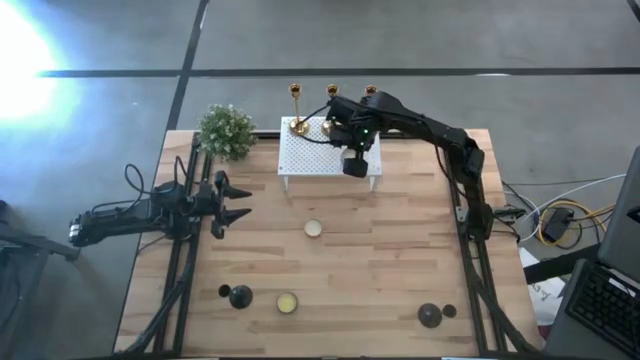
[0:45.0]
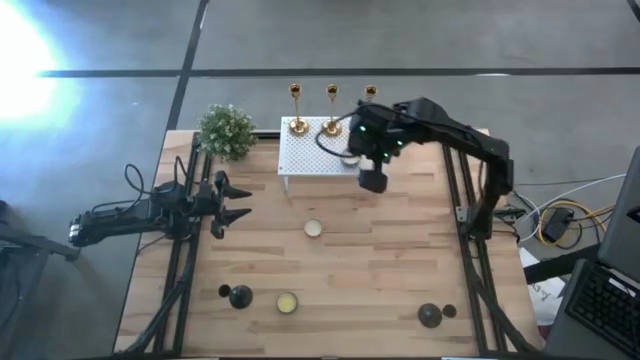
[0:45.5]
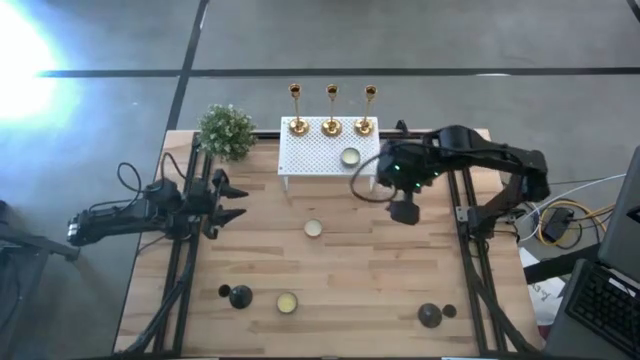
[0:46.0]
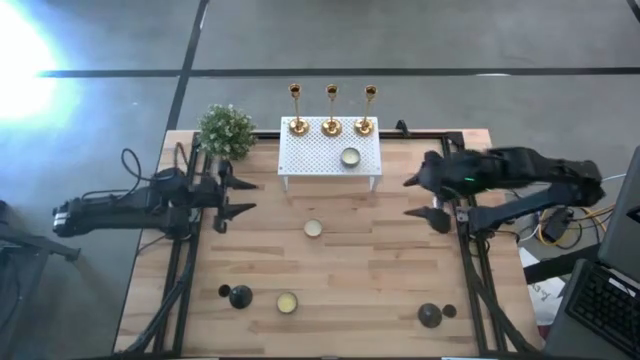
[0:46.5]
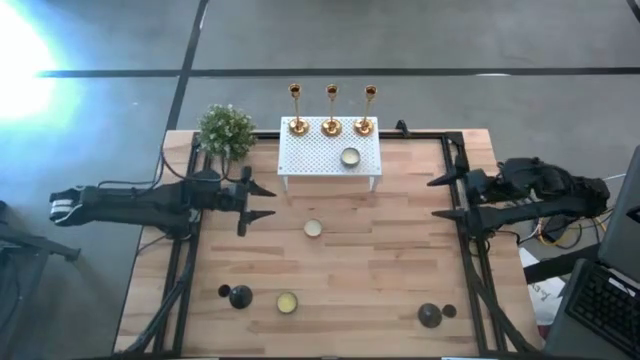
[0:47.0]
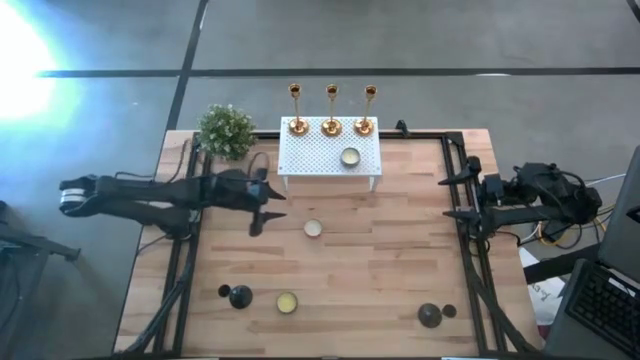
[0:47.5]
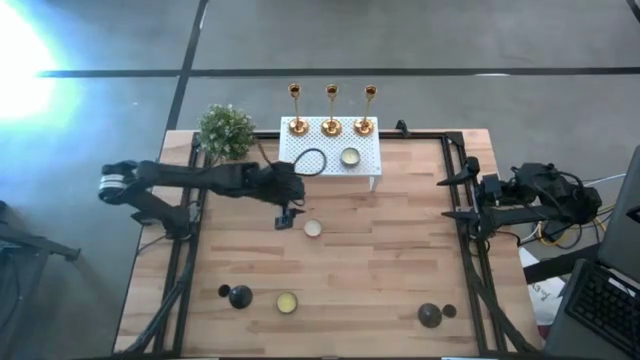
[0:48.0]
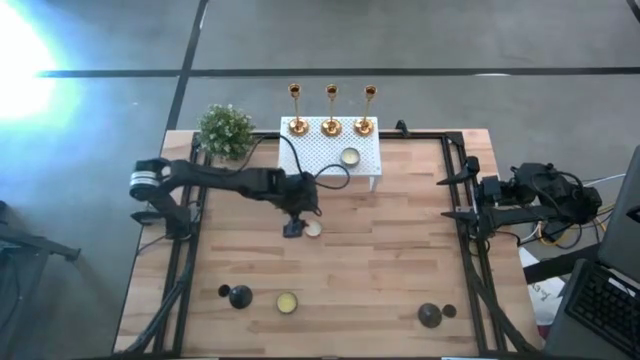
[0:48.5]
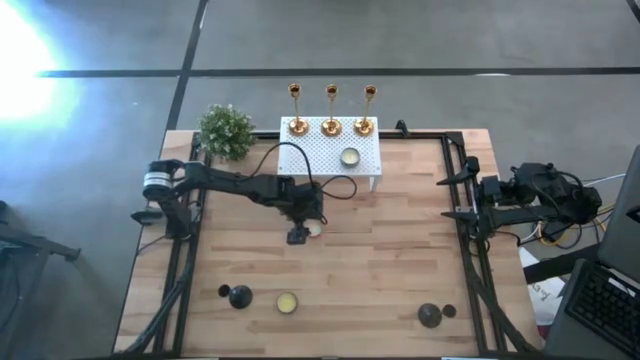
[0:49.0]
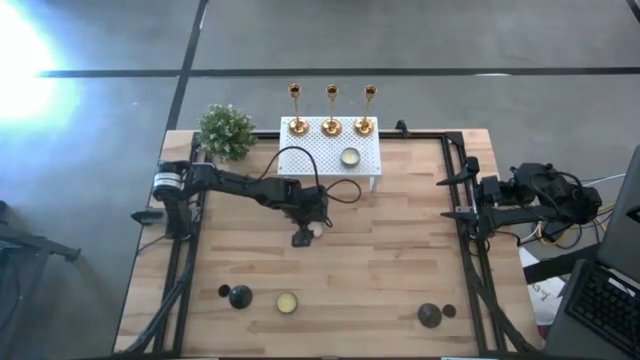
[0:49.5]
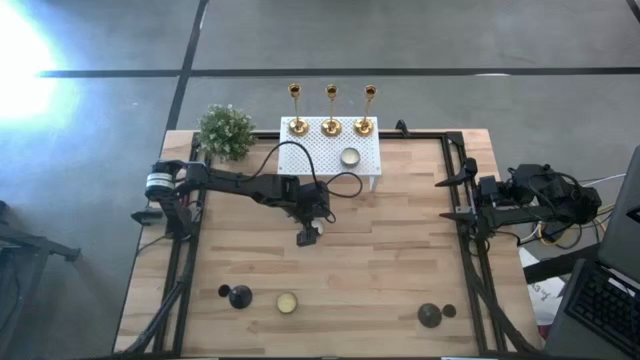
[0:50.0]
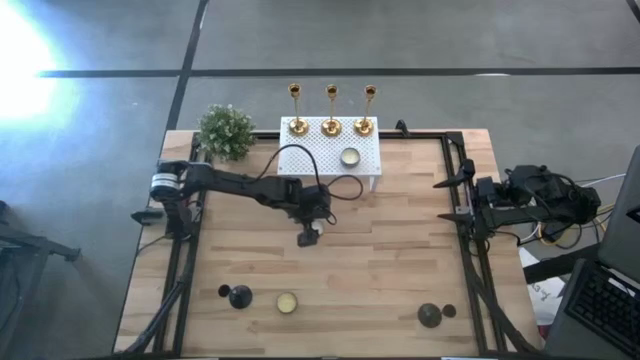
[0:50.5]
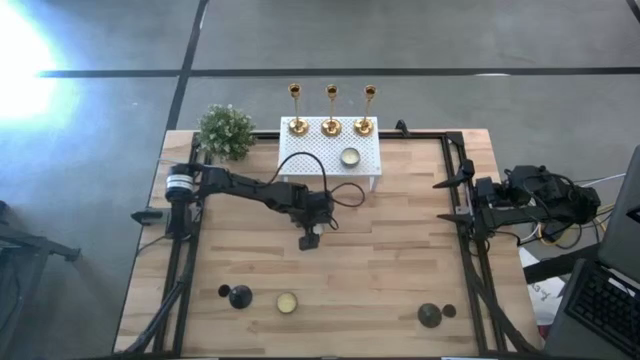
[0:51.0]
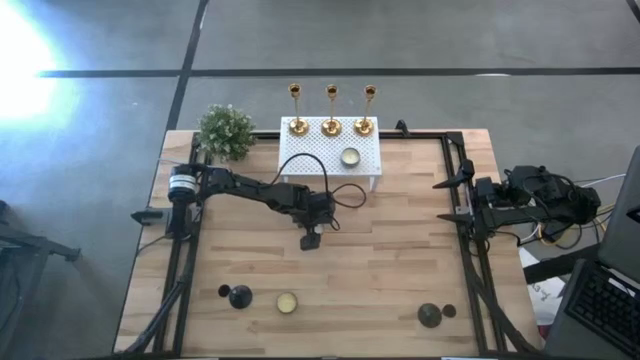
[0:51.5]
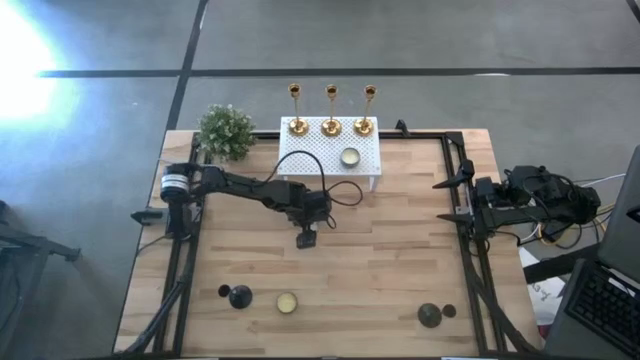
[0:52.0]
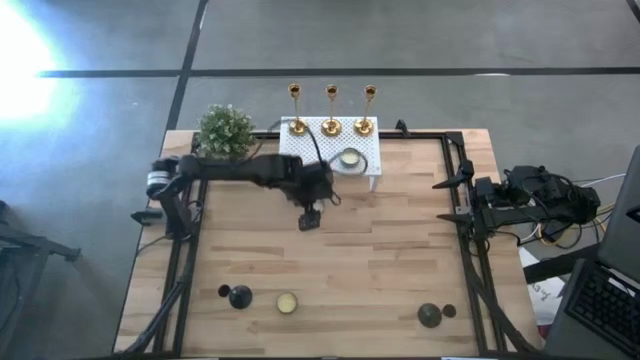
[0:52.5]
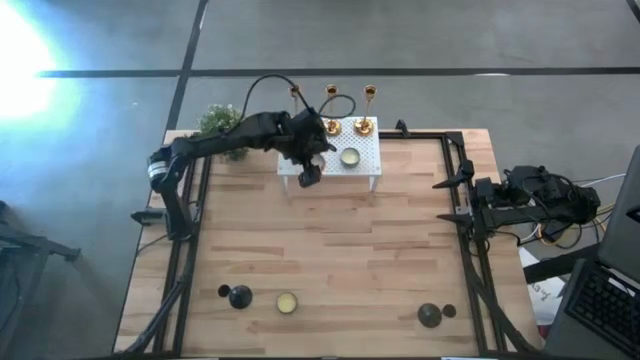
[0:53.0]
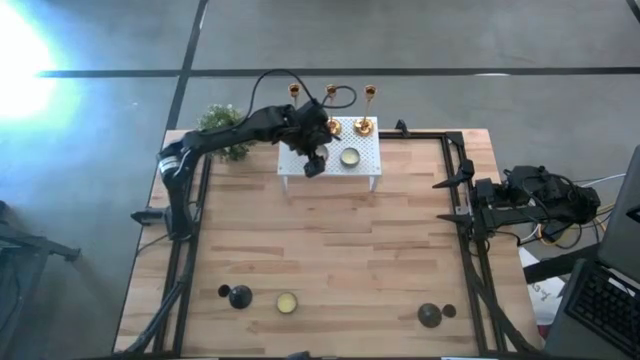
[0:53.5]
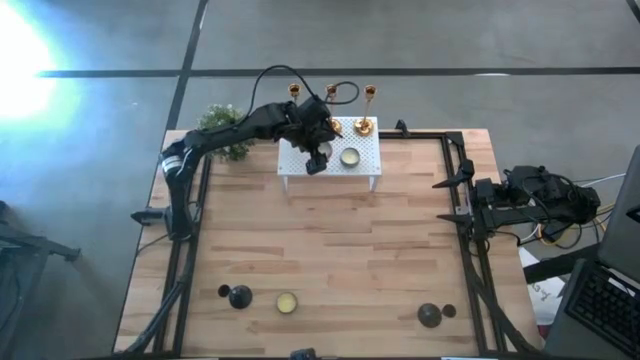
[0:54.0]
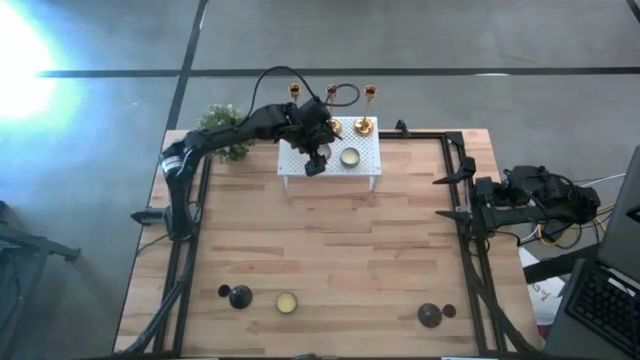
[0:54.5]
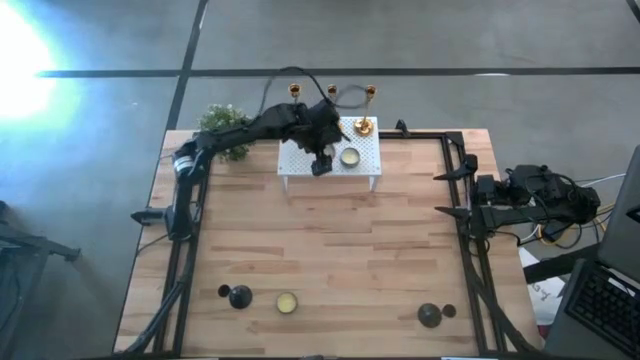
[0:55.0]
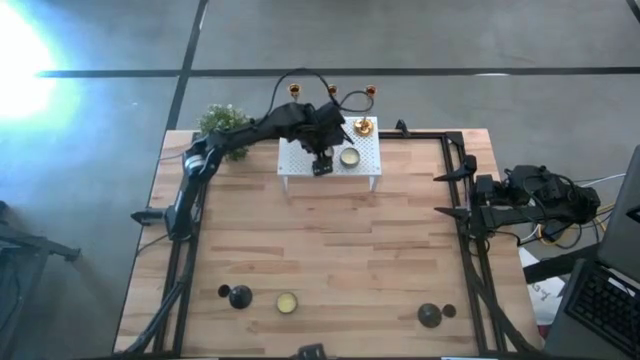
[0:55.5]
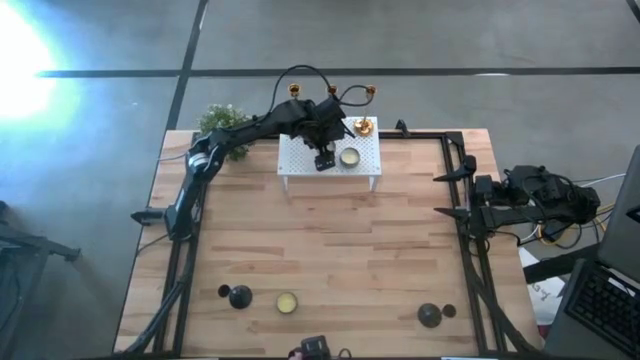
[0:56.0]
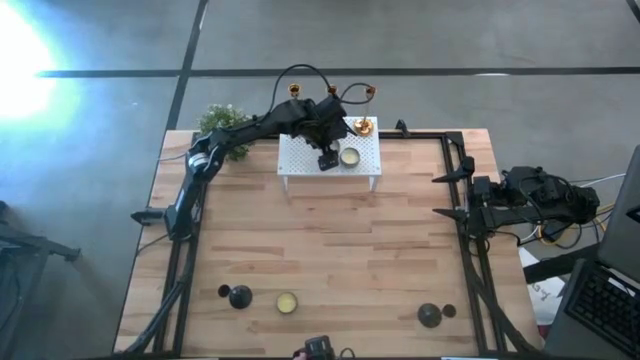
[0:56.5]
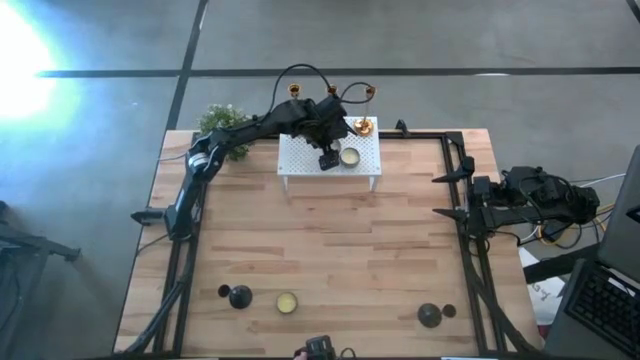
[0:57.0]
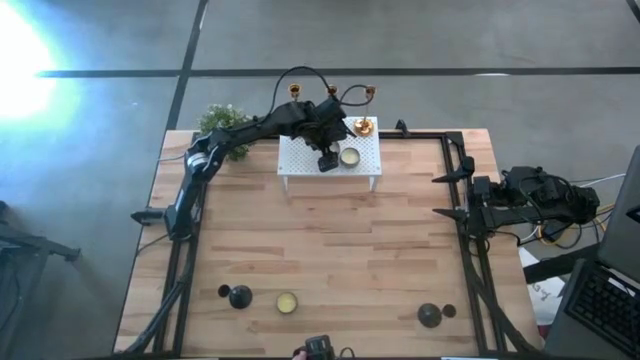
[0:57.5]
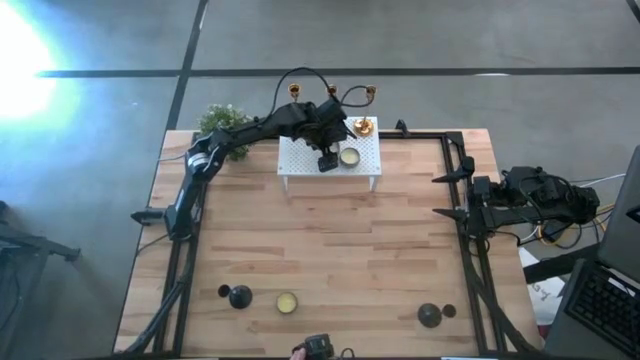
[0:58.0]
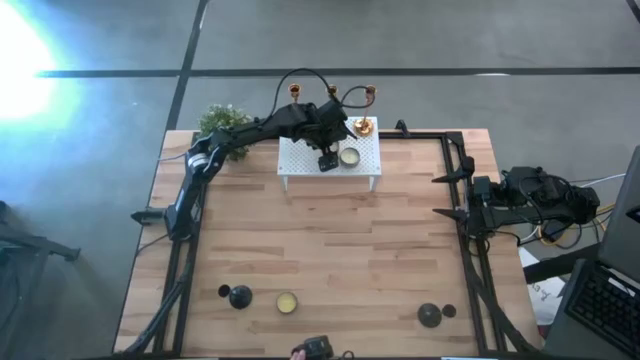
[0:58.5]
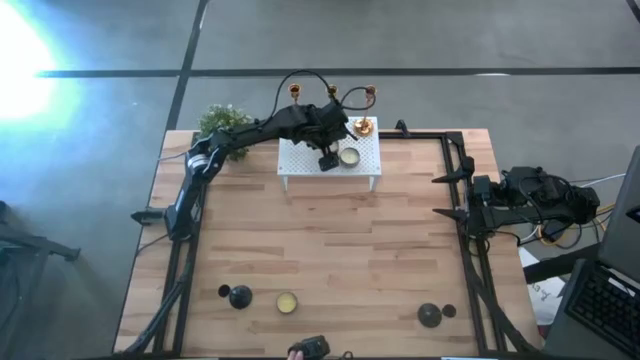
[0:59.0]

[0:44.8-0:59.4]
Task: Pick & Place candle stick holders
Put the orange scented candle on the shelf aligned with the other scented candle

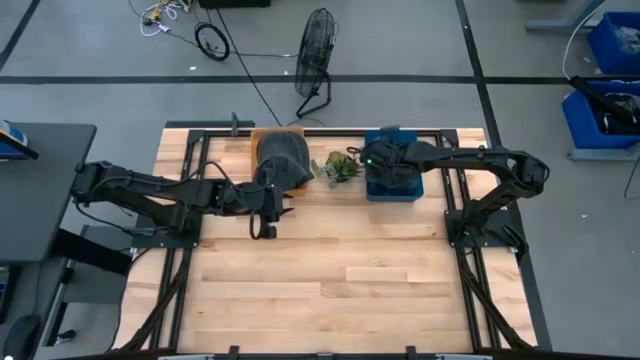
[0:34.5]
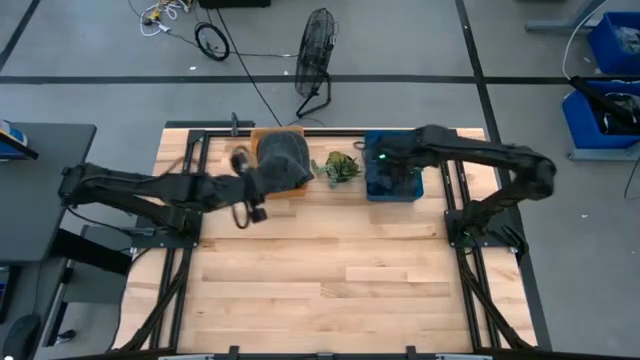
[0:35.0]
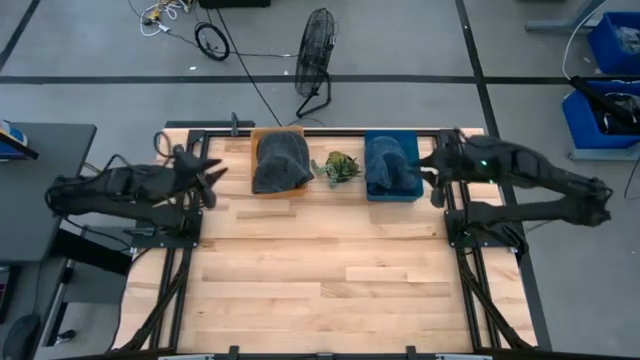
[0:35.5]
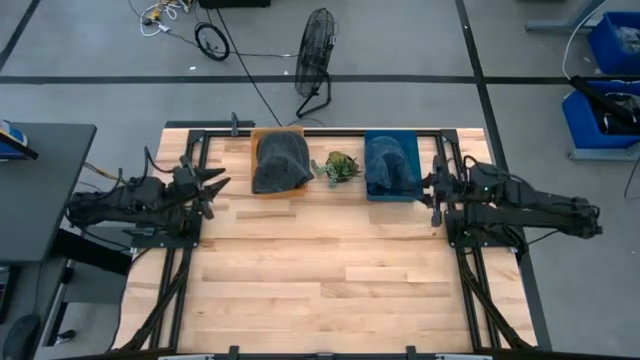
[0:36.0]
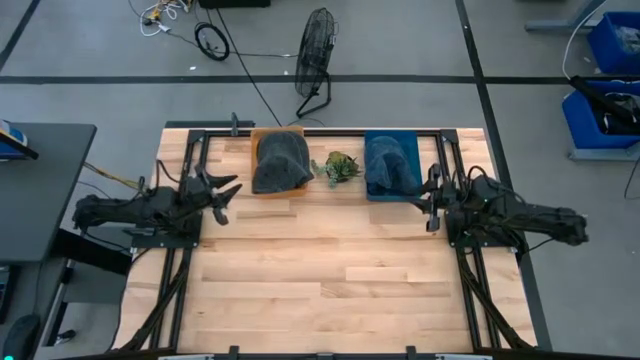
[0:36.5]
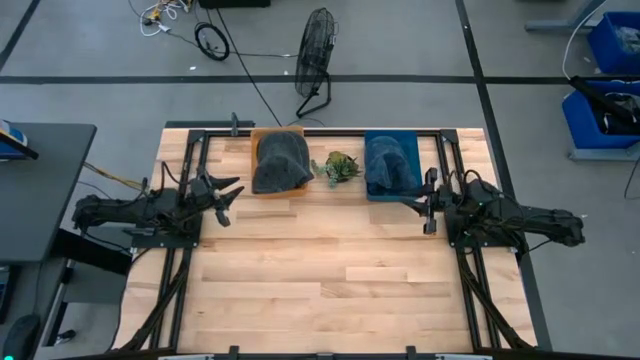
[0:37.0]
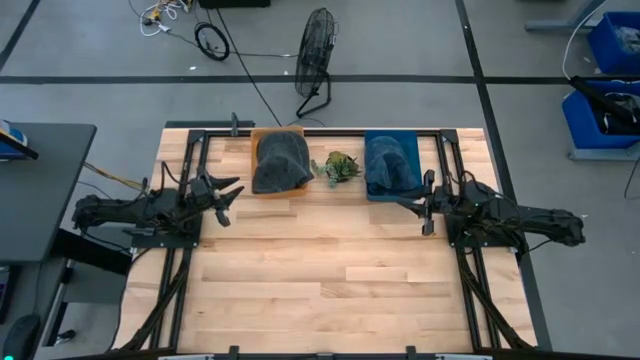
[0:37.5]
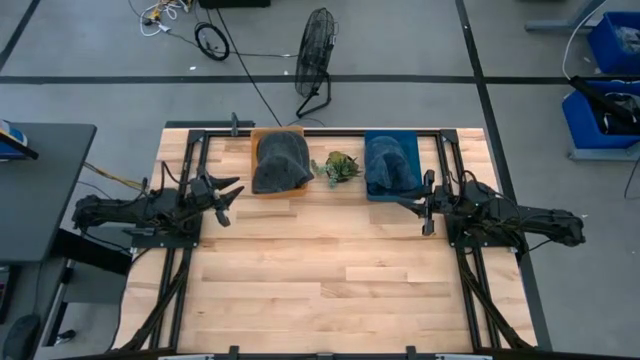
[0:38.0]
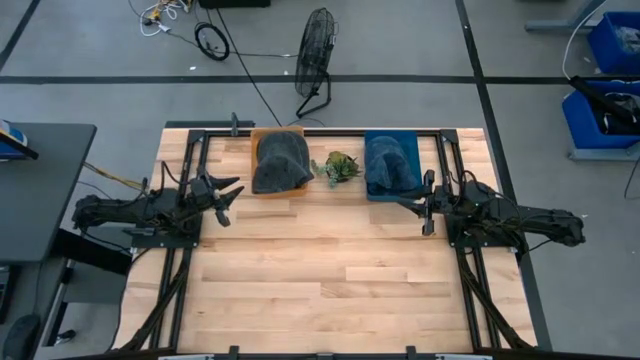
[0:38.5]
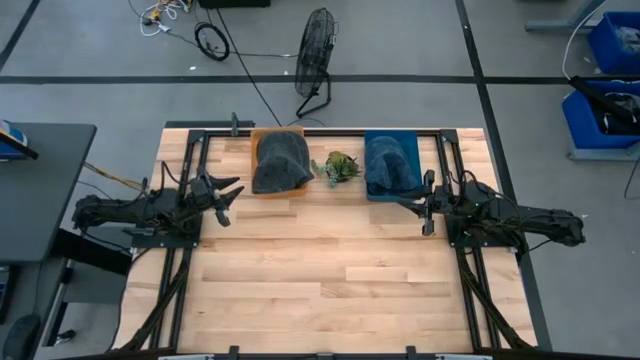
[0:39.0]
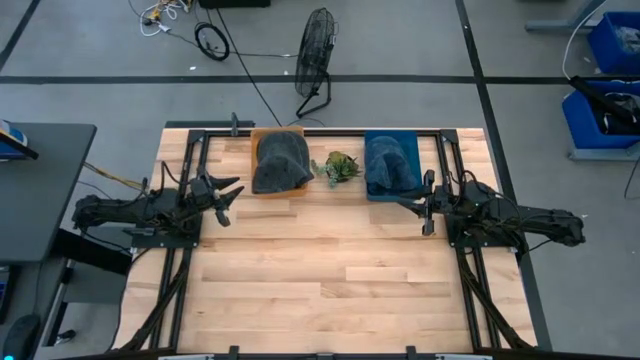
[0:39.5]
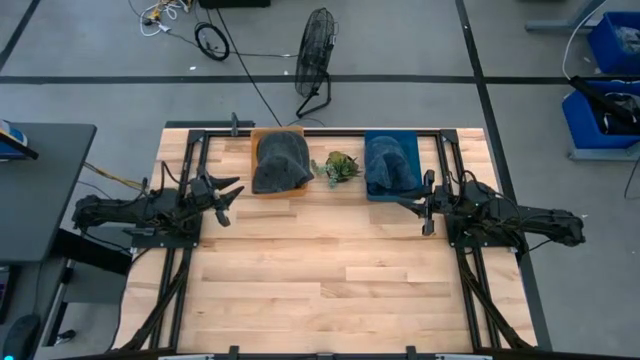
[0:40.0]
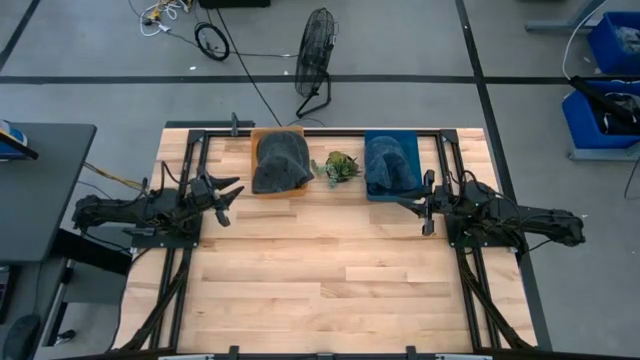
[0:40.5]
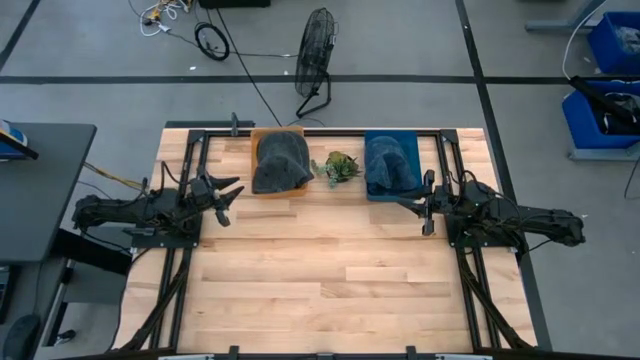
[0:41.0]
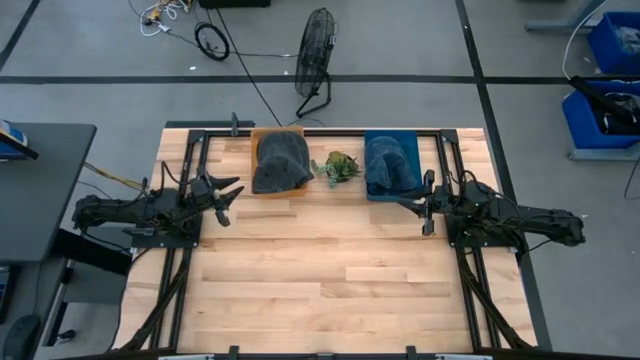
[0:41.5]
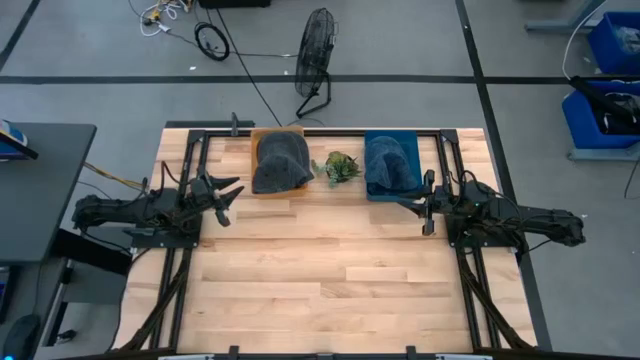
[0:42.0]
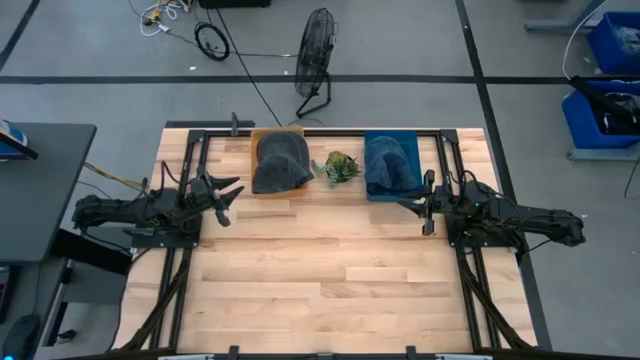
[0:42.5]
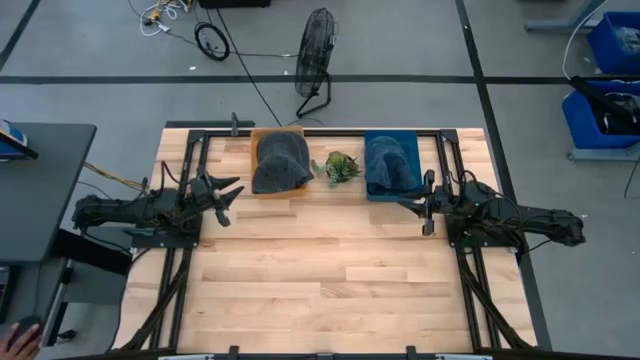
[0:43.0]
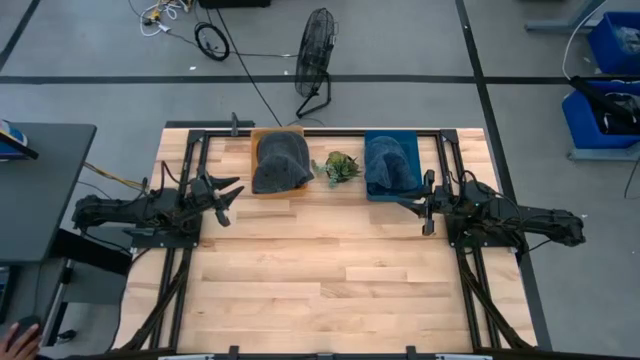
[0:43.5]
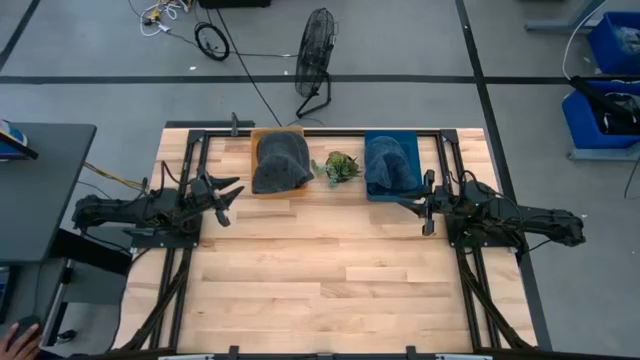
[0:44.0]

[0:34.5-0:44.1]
Task: Pick & Place hat
Return to Home Position
